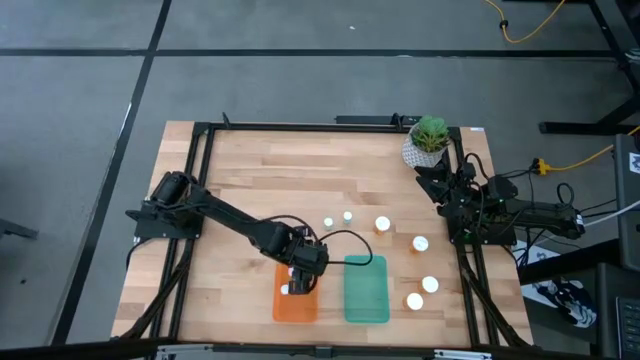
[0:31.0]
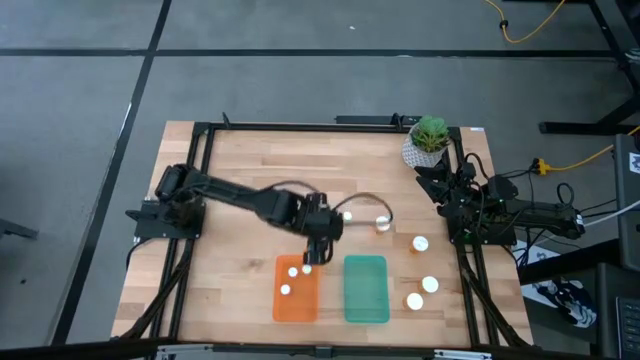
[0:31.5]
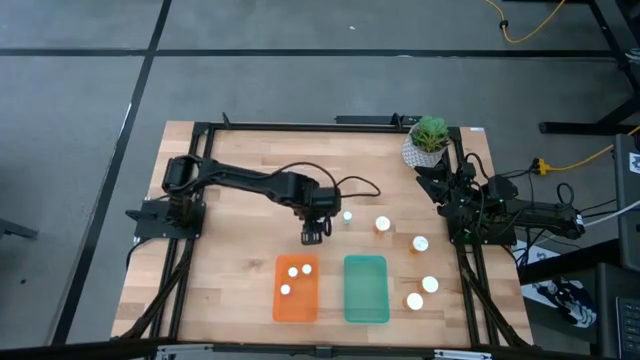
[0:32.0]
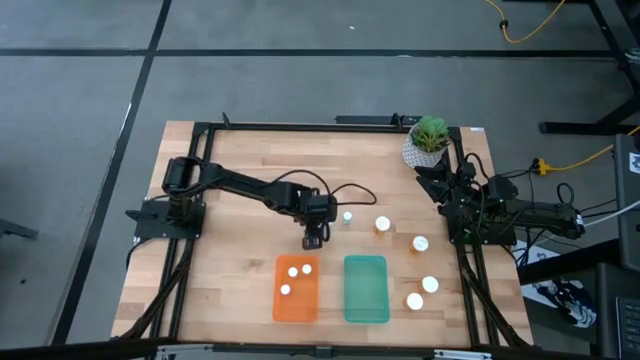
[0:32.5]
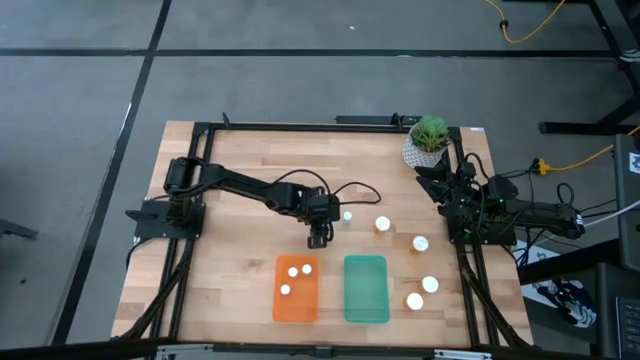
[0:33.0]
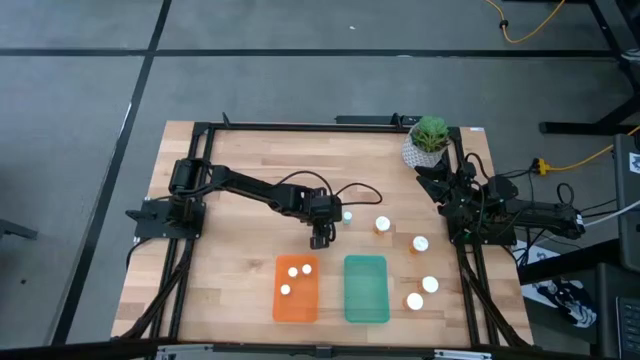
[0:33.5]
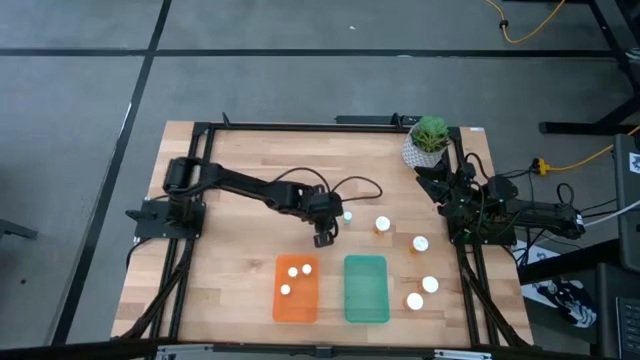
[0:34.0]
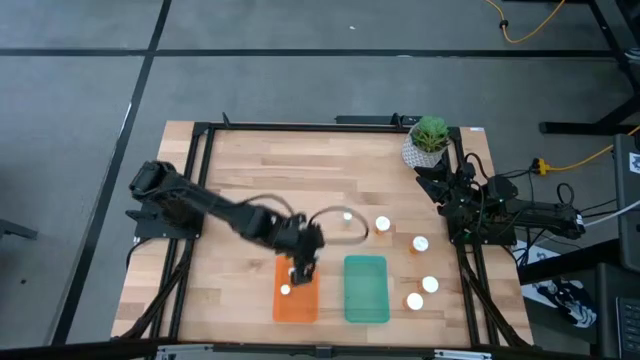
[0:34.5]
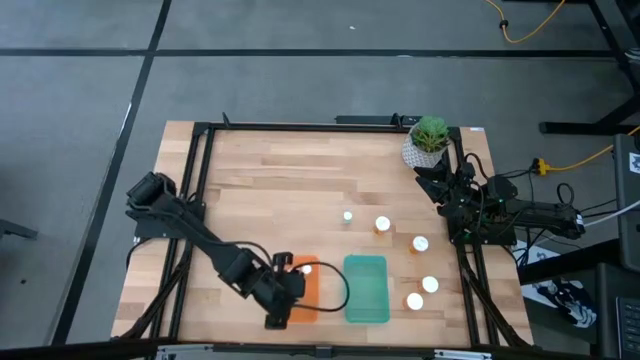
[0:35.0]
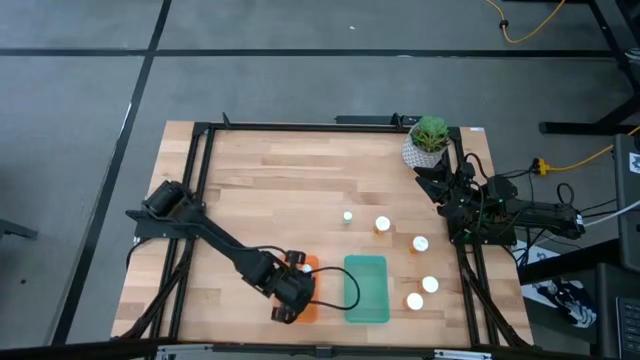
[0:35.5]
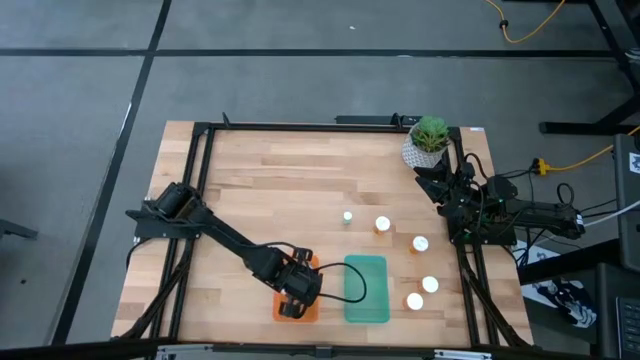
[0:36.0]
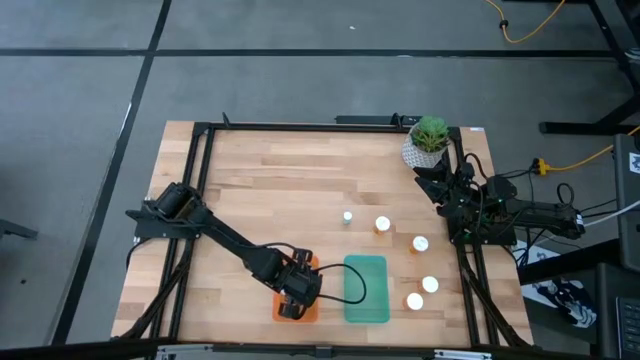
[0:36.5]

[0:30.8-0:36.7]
Task: Pick and place medicine bottles into bin by pill shape (circle, oval)
Put the left small blue pill bottle into the orange bin

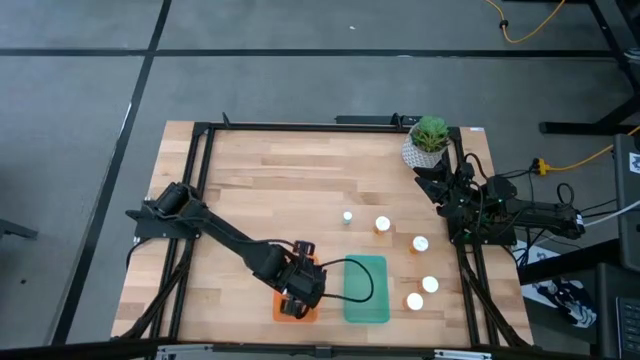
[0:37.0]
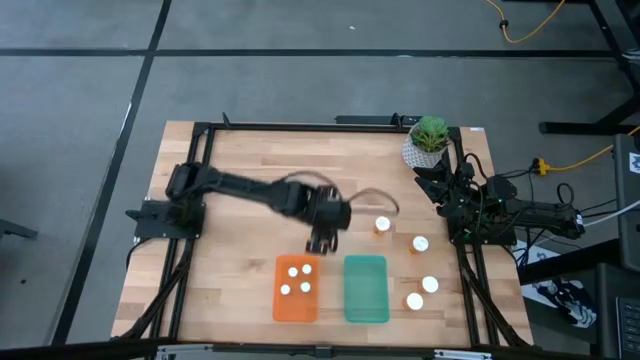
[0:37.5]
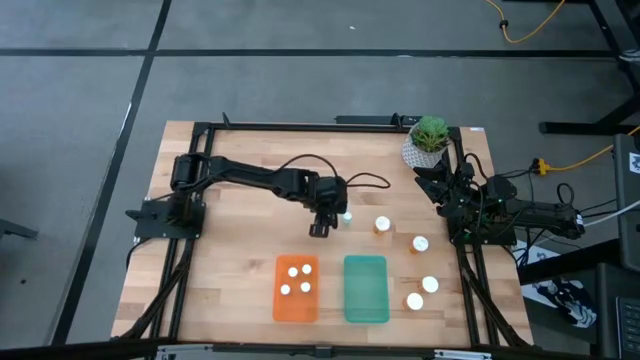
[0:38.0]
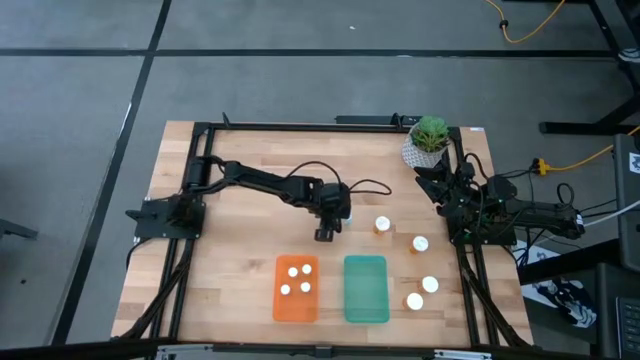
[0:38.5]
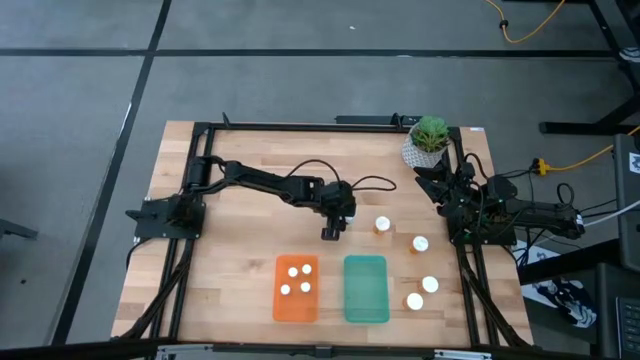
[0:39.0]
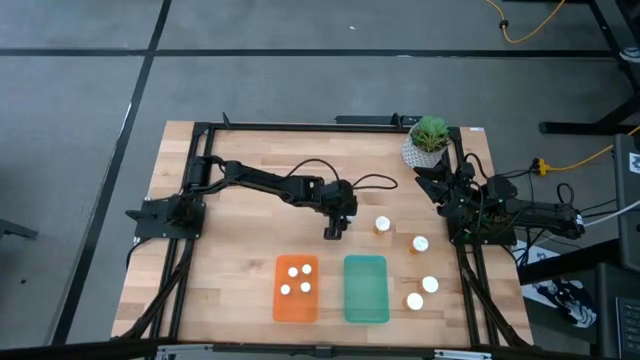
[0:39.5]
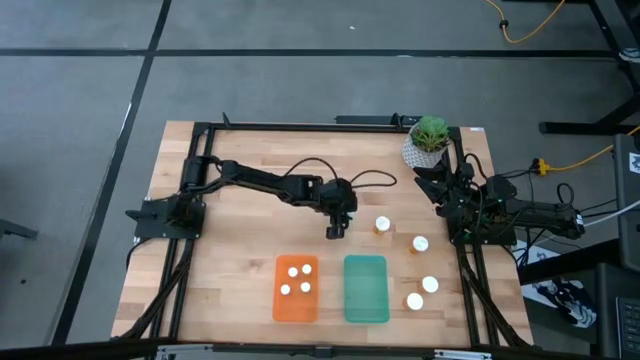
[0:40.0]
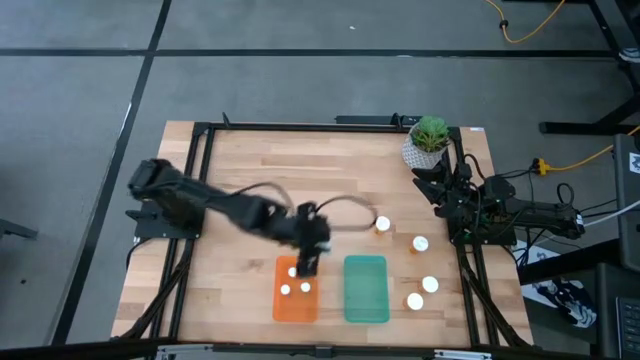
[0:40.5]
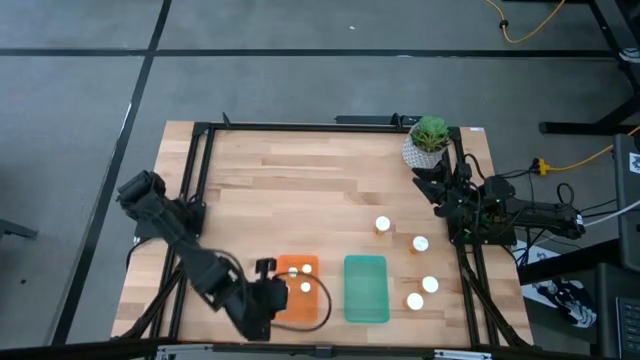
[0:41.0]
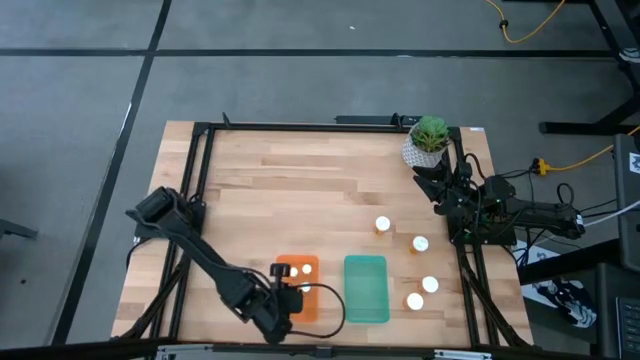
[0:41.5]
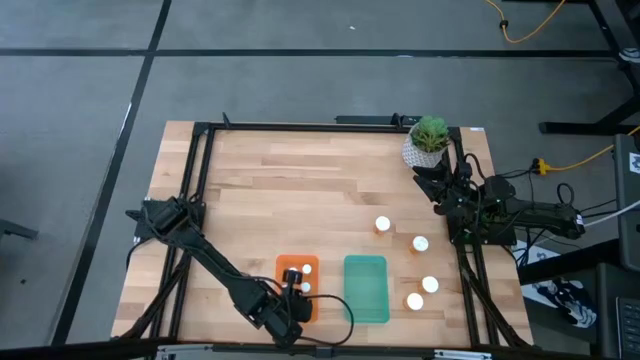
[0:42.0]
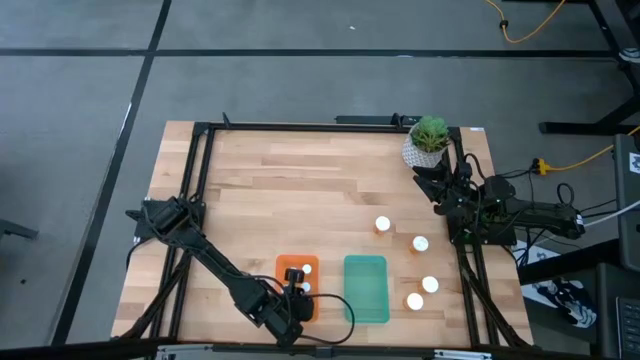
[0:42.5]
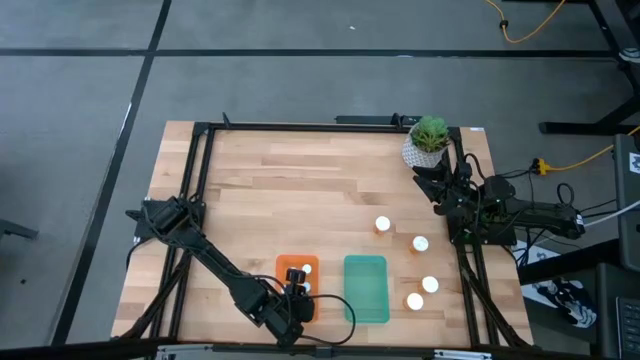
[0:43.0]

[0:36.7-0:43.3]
Put the small blue pill bottle into the orange bin

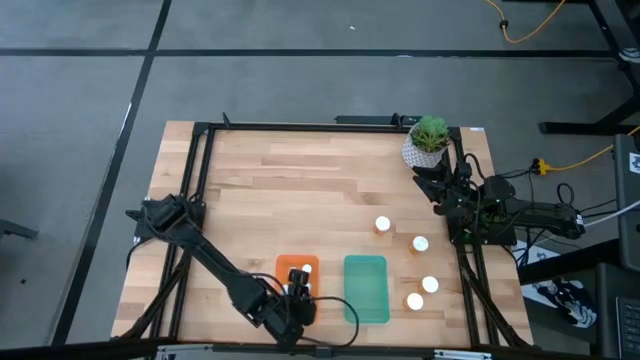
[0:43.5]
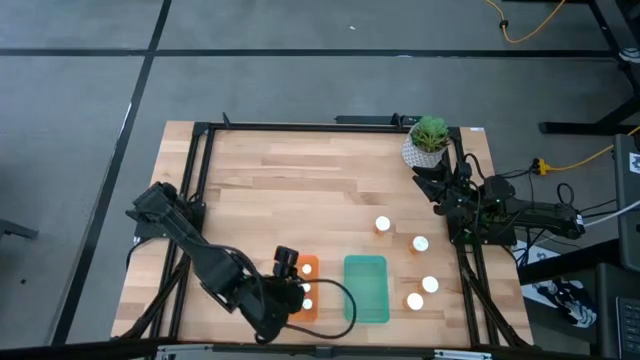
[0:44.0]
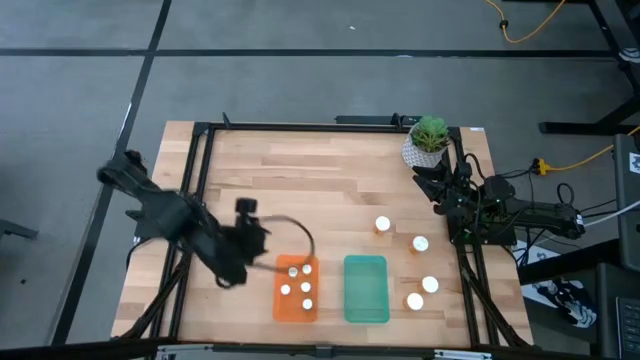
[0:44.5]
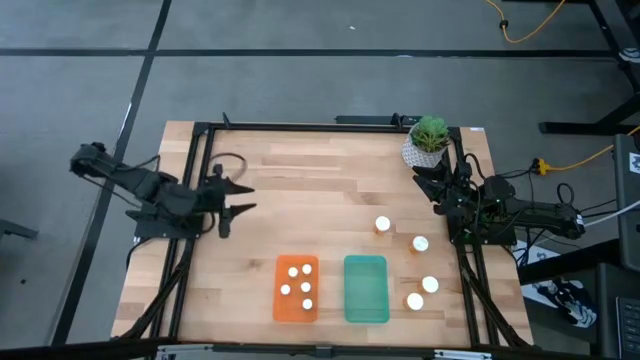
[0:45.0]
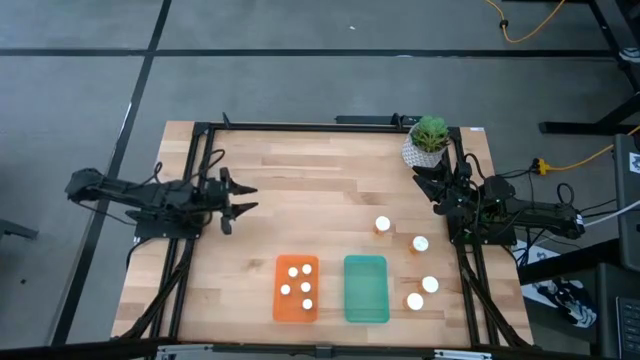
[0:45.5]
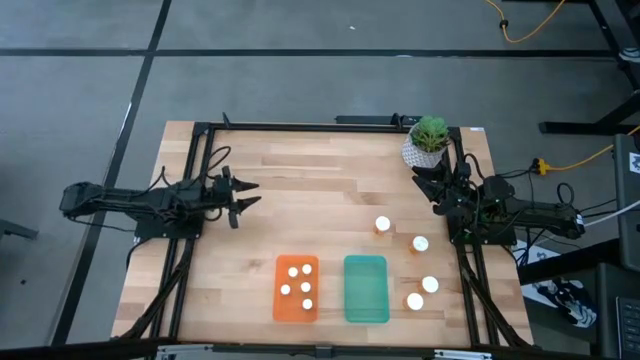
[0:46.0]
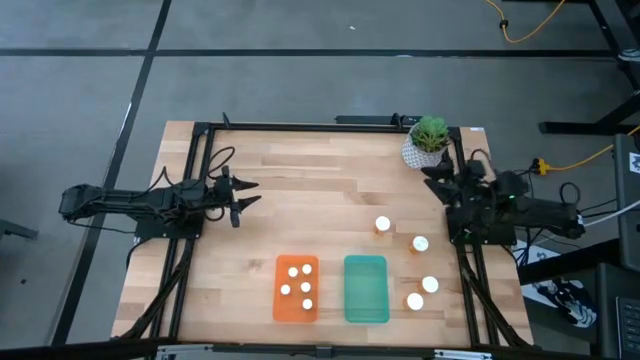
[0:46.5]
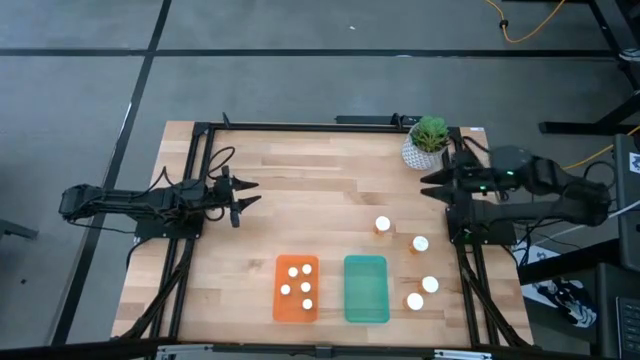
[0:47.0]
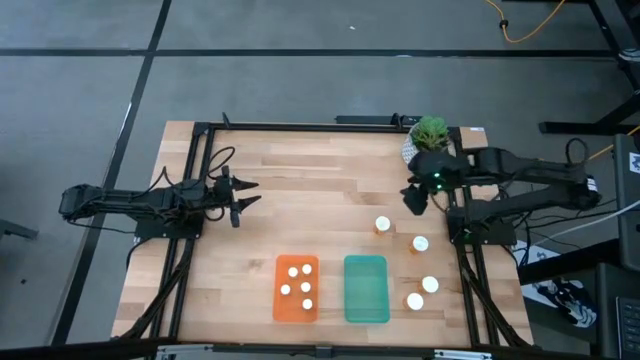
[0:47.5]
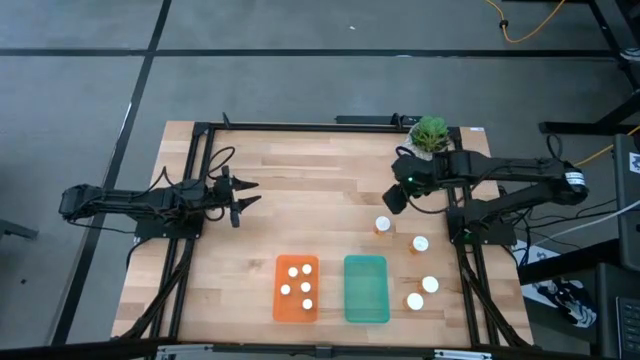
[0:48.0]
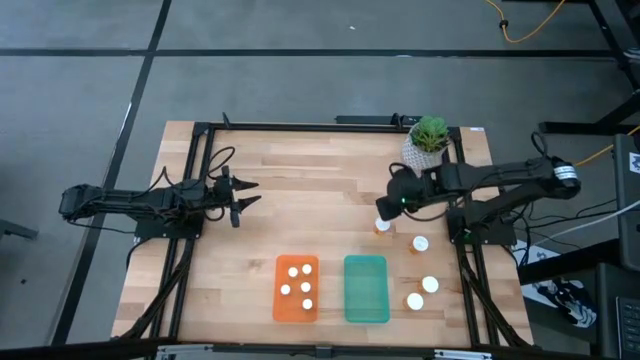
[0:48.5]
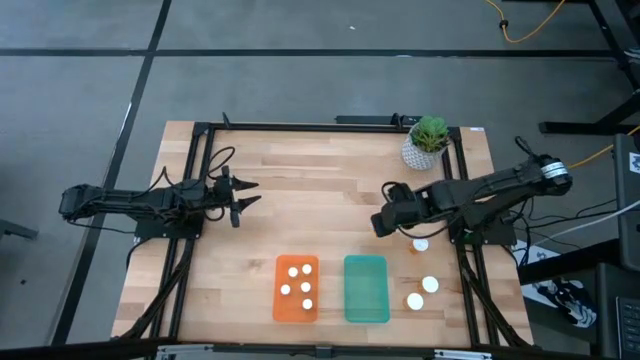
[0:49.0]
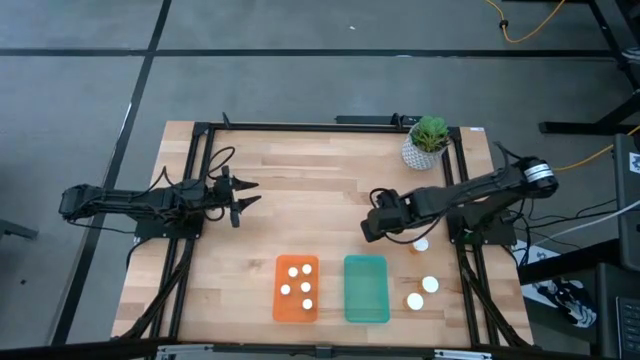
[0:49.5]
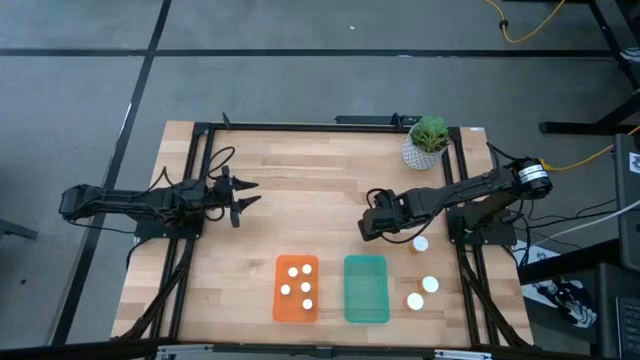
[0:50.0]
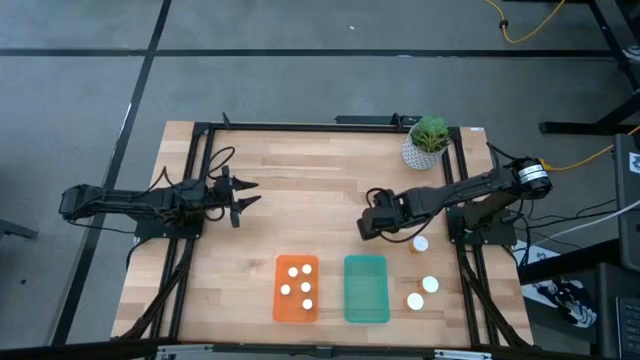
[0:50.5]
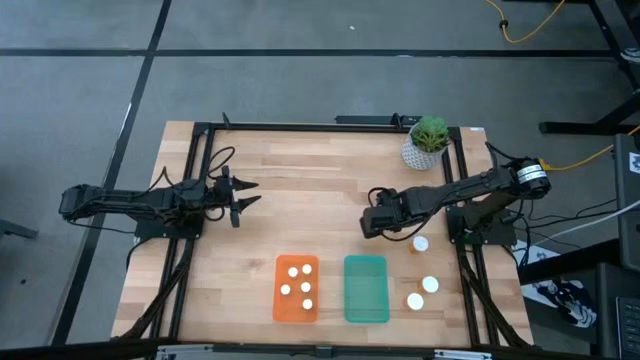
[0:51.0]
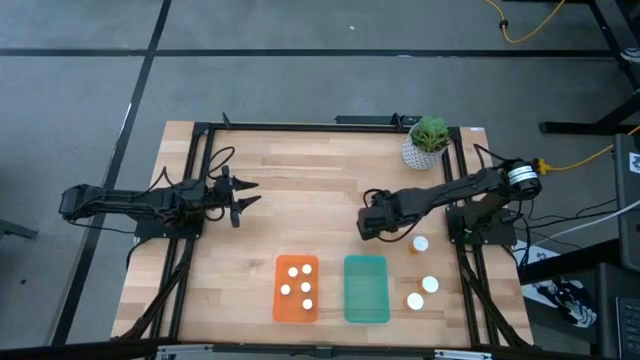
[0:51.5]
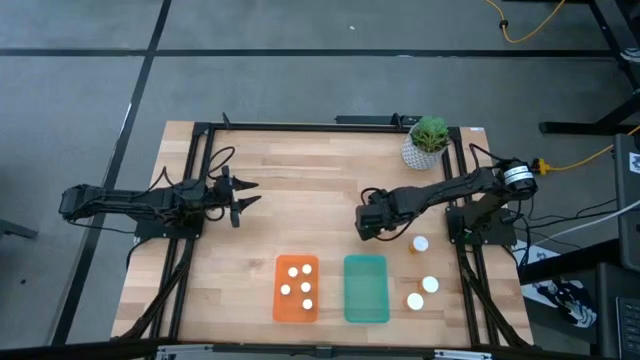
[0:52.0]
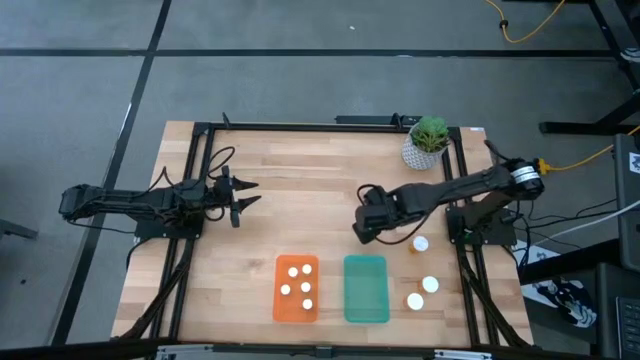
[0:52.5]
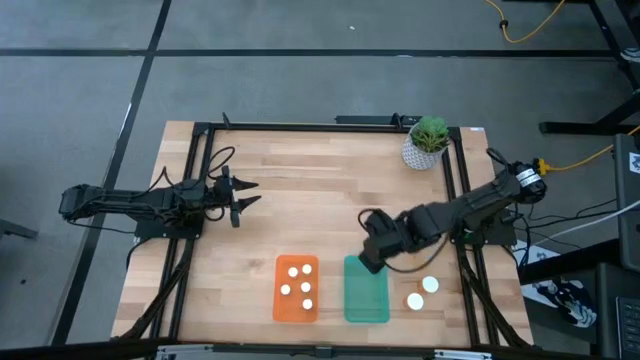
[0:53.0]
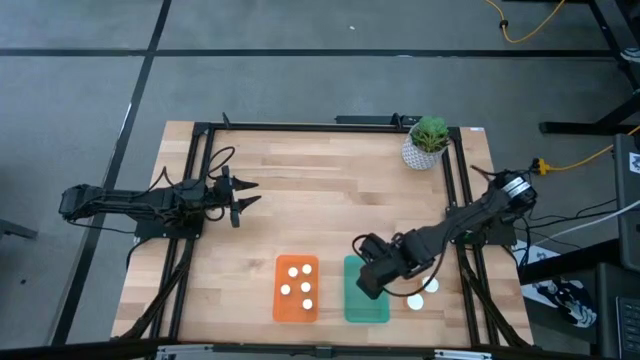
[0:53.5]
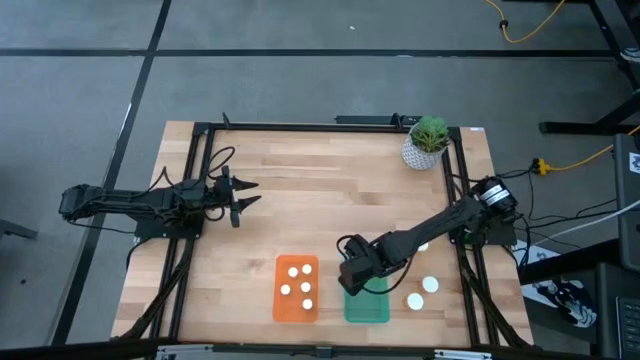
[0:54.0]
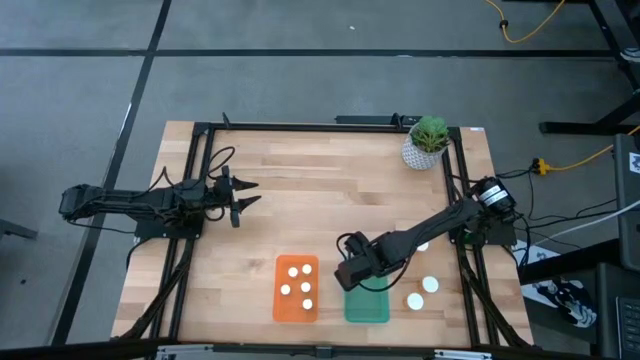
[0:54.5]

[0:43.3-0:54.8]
Put the top big orange pill bottle into the green bin
